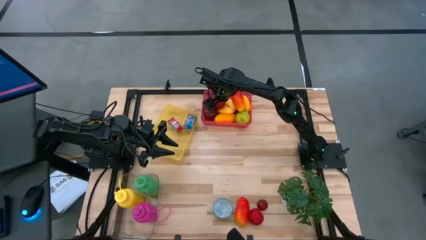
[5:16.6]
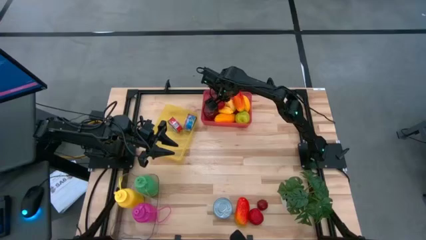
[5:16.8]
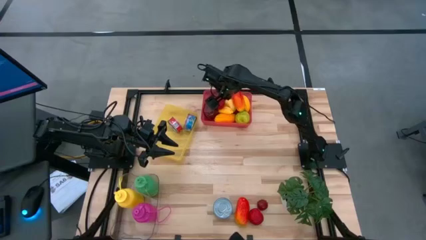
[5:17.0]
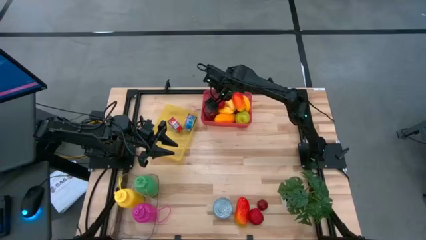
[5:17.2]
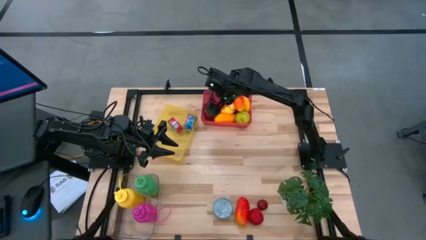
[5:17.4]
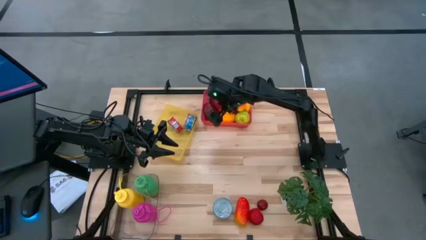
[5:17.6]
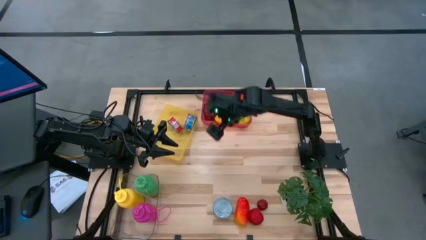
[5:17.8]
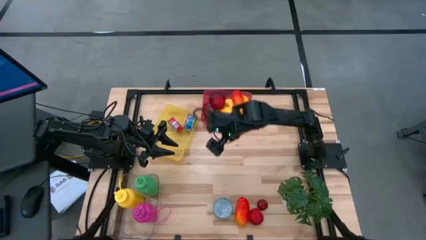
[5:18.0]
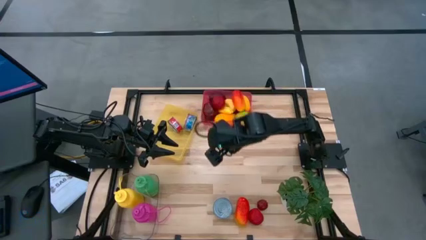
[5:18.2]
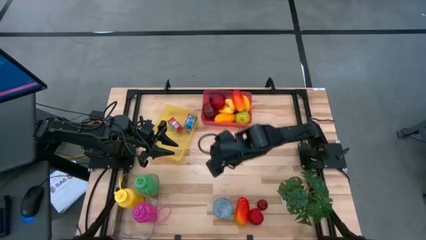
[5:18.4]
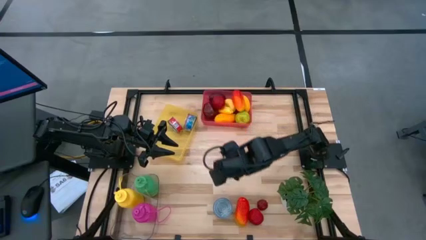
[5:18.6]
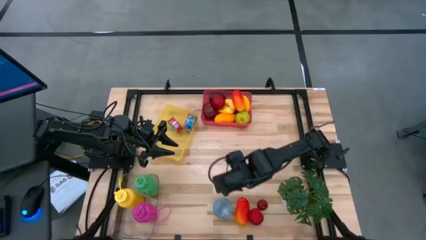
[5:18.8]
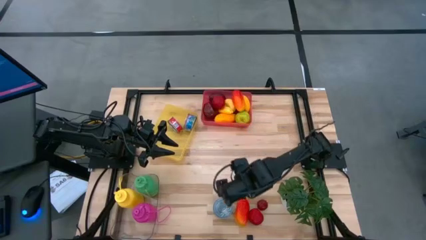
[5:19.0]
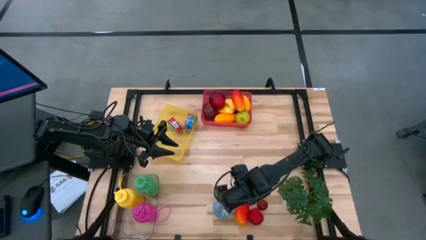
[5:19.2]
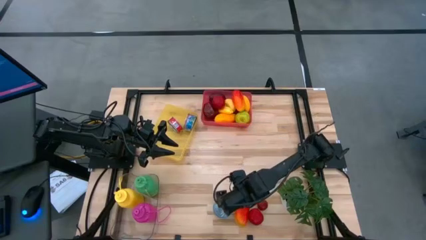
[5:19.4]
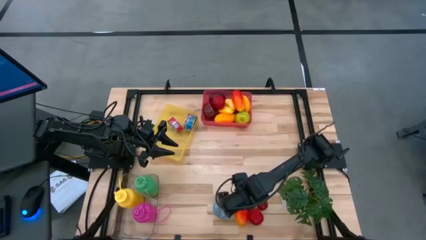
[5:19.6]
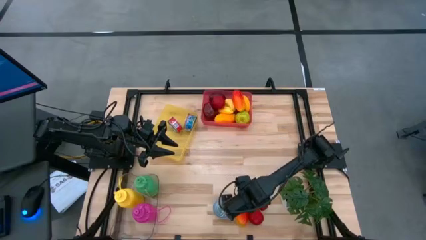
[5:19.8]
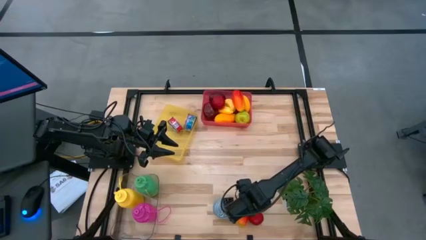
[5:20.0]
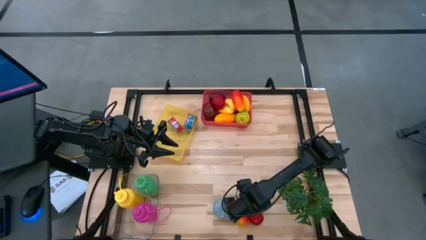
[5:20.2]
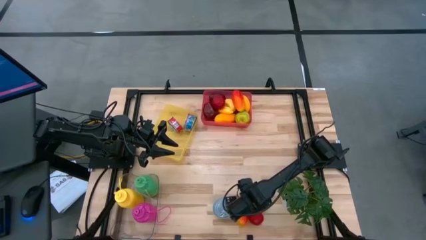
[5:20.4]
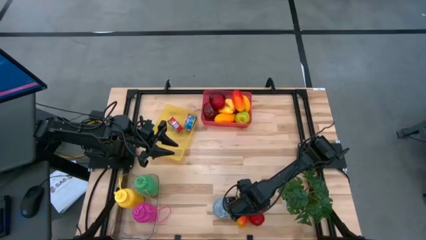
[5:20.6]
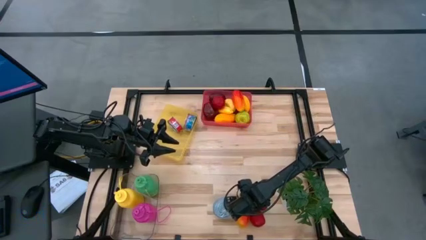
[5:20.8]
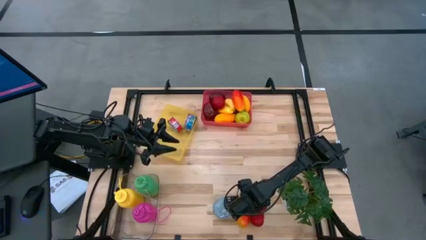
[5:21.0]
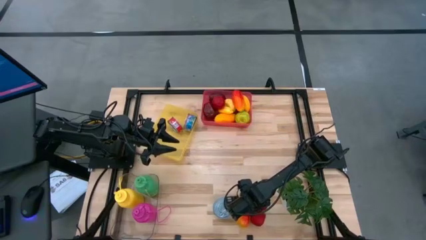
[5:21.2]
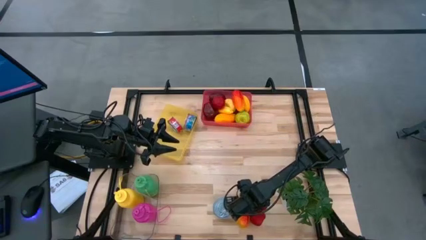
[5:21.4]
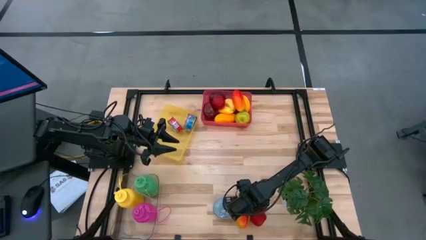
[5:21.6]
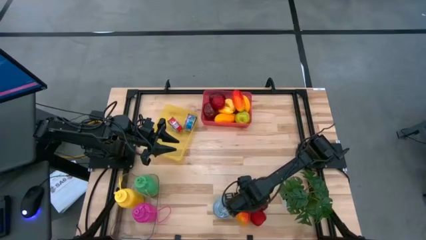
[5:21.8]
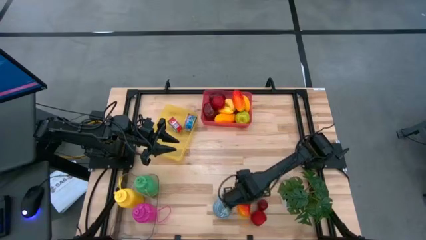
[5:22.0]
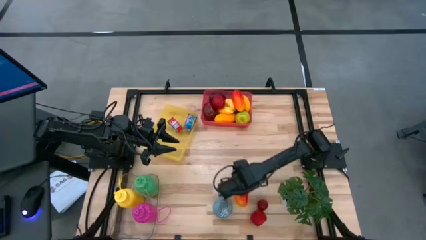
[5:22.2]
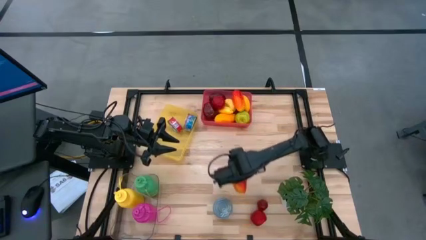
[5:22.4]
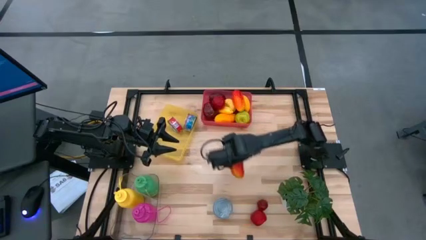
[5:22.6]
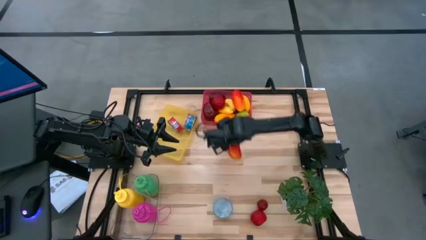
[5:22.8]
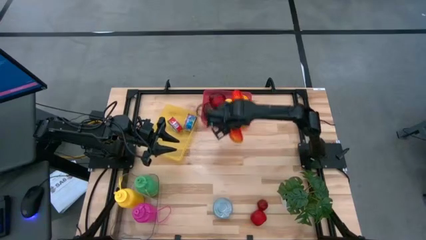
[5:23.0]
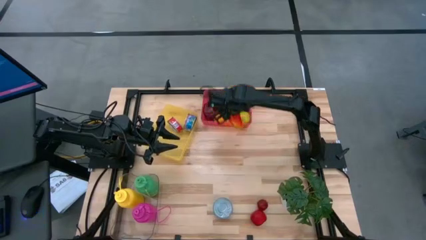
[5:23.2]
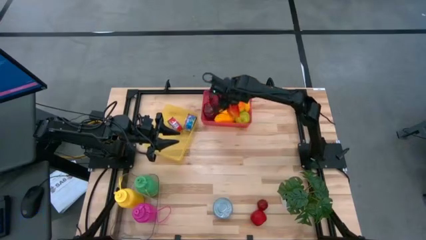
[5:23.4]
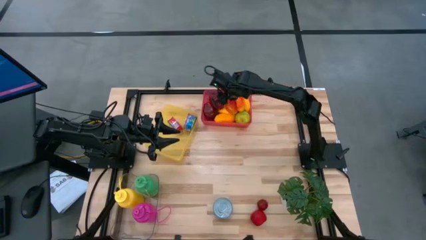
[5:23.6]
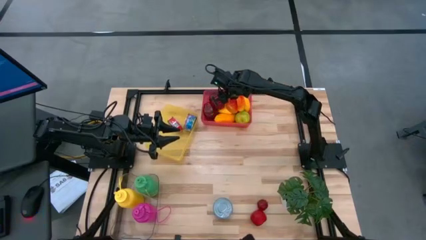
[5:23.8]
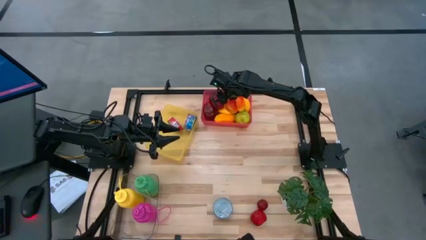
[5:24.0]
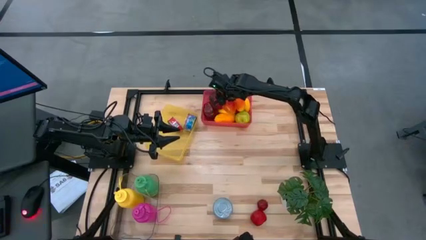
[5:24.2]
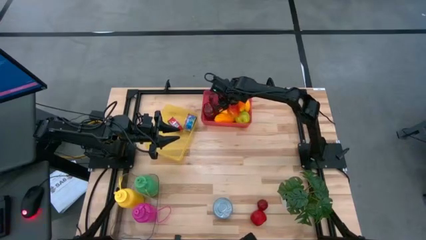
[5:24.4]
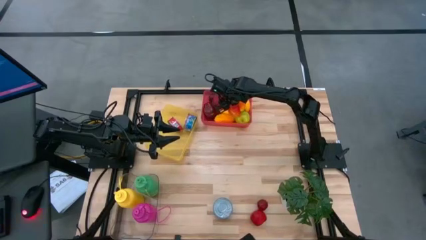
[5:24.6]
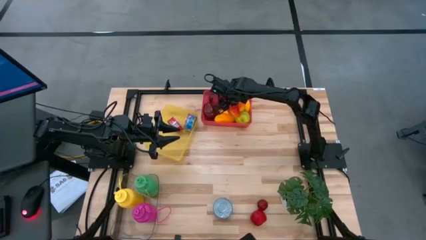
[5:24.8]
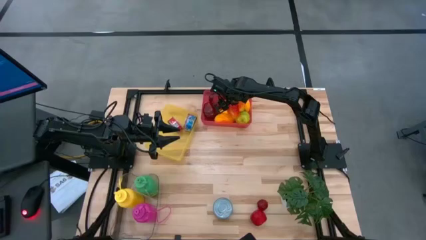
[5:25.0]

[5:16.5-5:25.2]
Task: Pick & Place Food Item
Put the red mango into the pink bin

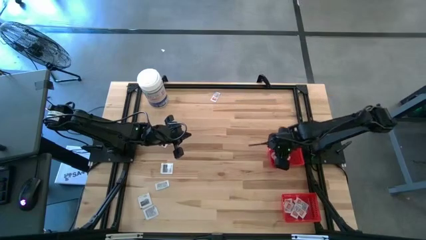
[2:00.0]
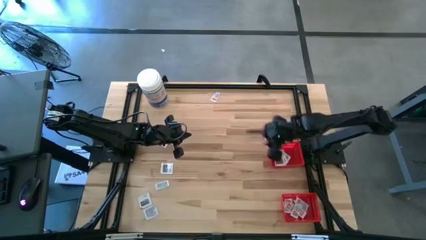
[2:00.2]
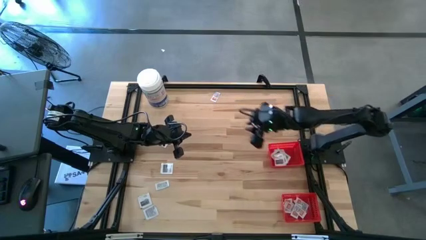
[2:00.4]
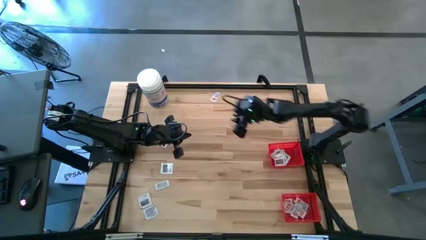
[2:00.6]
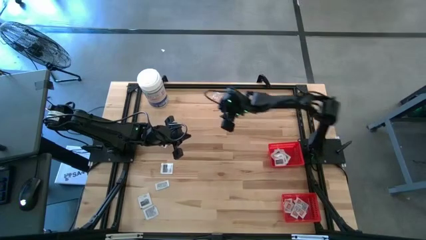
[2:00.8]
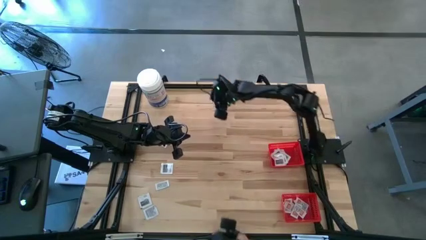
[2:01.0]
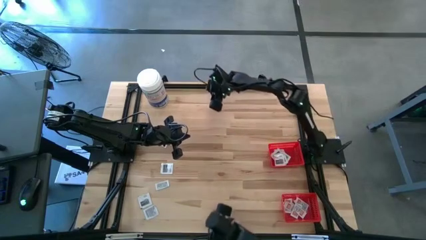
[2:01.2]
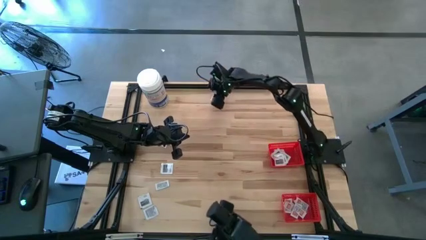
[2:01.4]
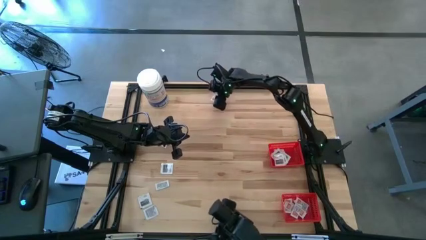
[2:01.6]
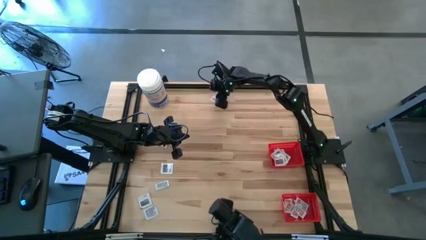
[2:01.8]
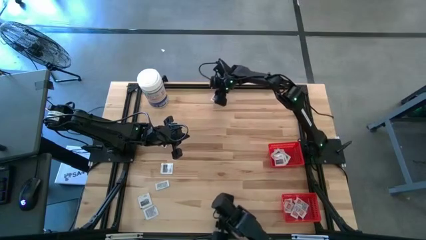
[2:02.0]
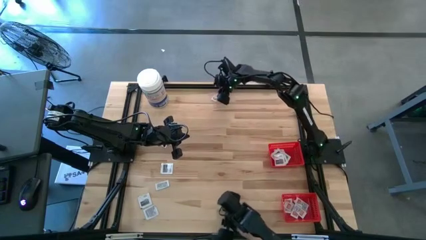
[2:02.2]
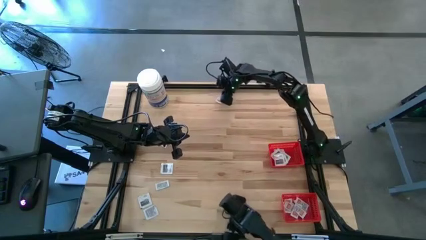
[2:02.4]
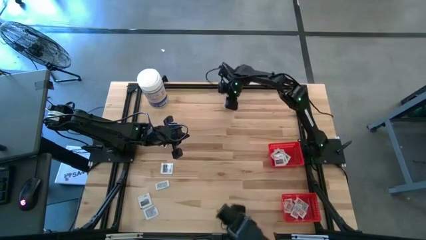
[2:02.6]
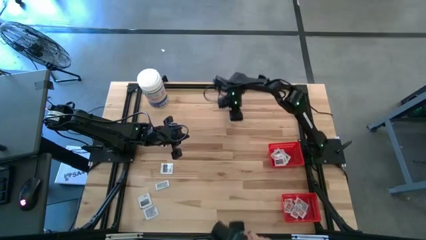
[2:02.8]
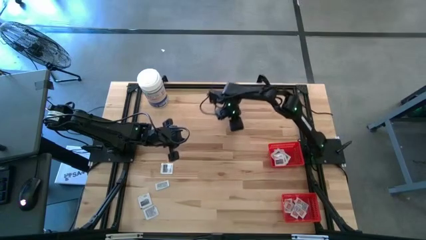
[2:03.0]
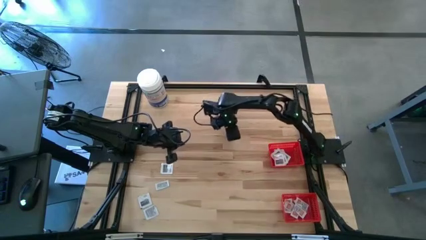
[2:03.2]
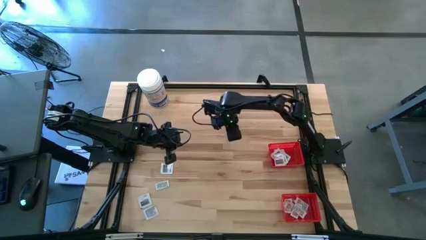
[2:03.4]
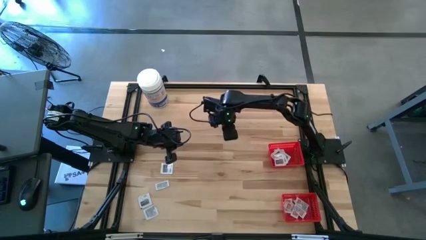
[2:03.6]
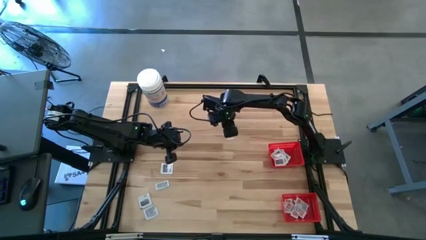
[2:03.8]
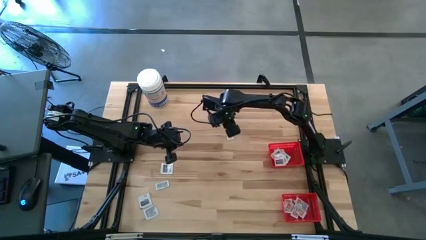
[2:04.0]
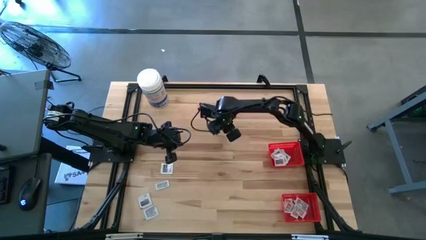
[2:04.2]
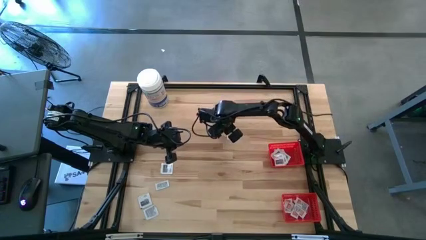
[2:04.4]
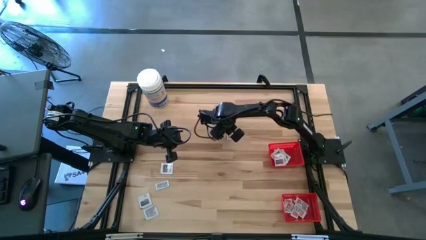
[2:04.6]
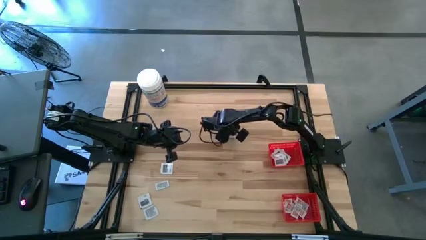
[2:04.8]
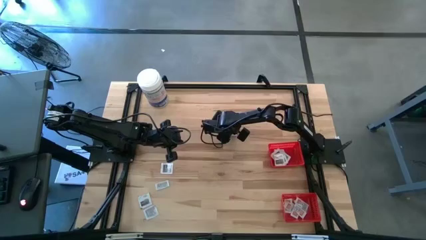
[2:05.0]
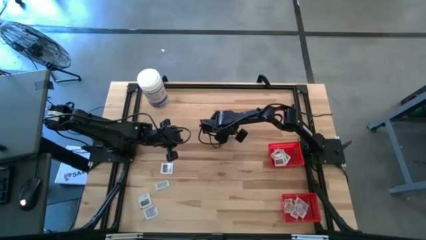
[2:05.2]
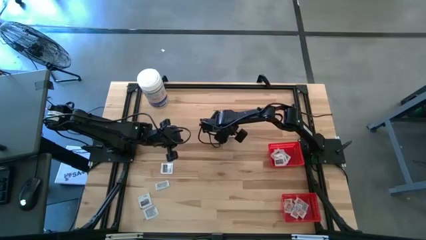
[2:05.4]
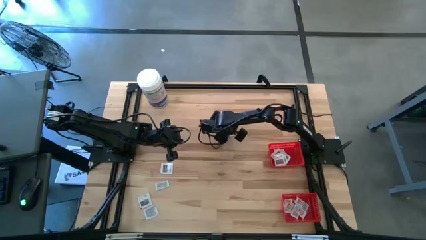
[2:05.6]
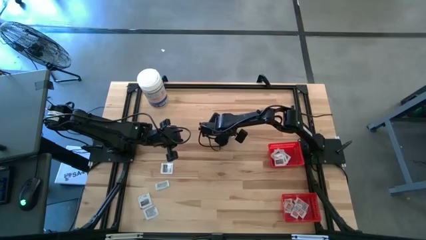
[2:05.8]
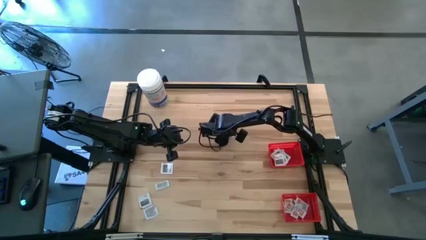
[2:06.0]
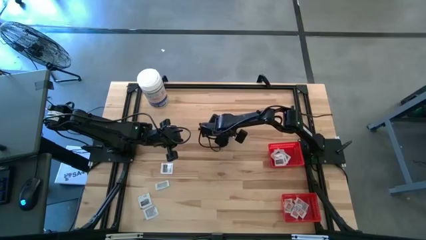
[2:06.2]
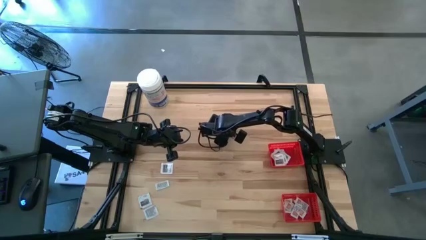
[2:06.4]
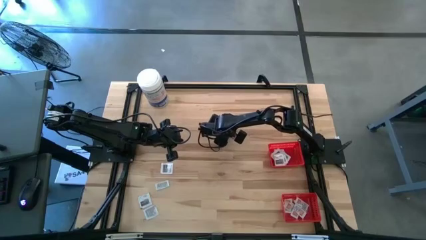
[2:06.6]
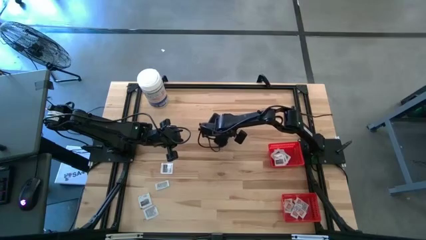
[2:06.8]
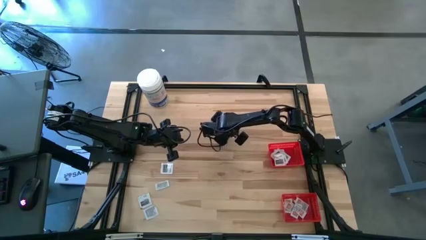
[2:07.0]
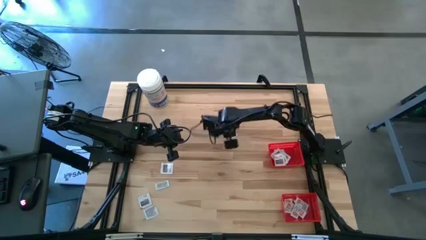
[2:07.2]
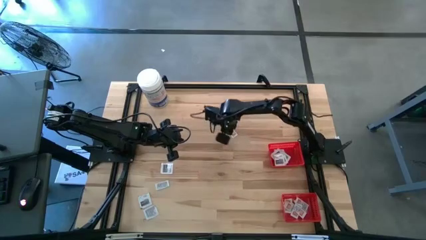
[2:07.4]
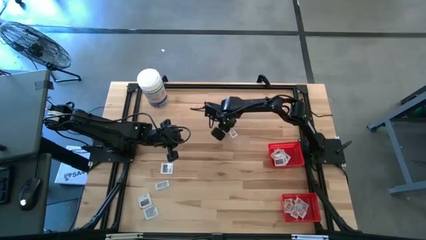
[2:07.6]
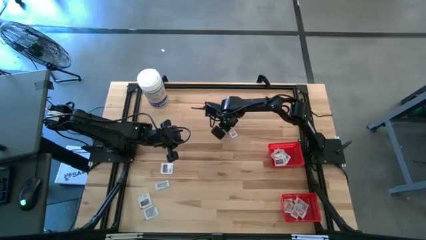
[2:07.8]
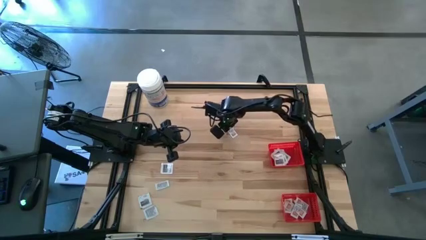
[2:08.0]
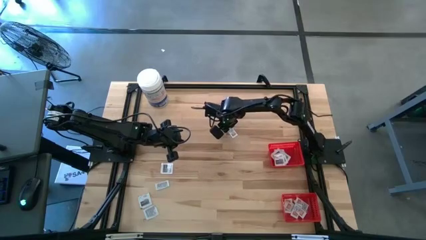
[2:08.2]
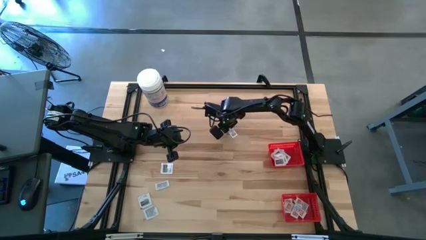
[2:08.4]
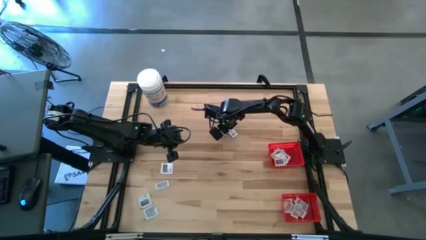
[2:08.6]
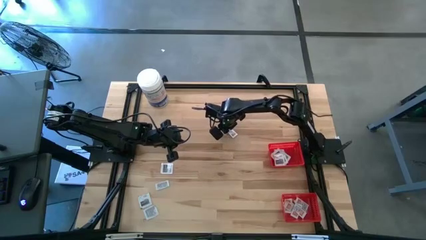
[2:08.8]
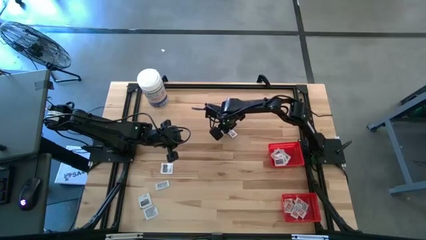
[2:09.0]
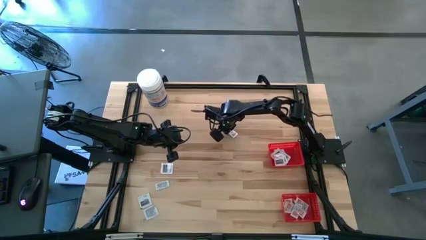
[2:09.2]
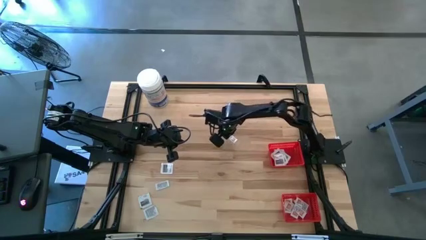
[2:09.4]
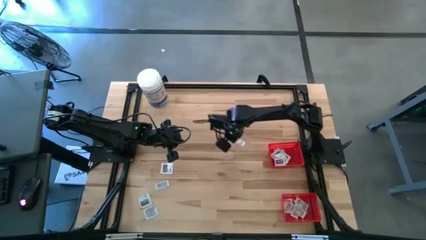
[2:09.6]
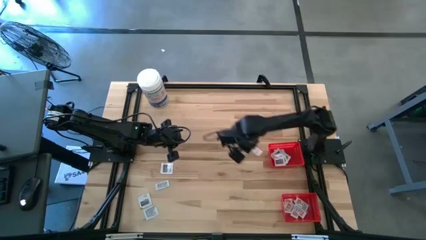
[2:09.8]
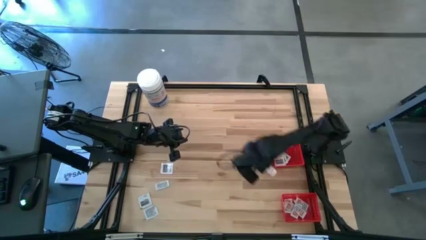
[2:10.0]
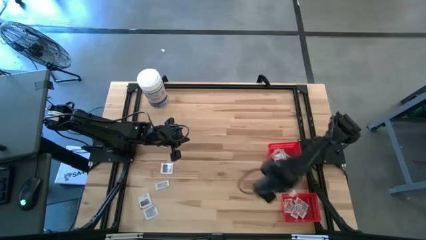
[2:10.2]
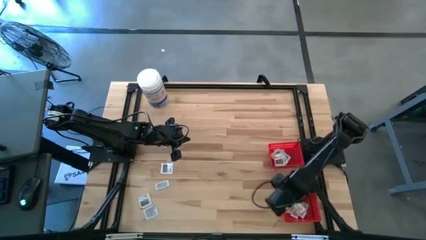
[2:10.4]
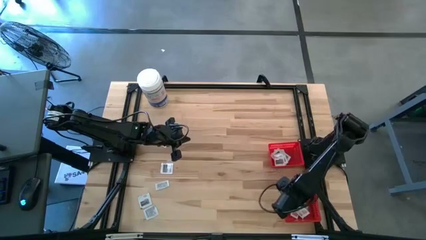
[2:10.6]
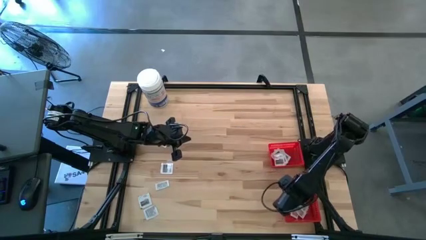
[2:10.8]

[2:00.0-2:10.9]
Task: Pick & Place First Aid Supplies
Put the orange ointment pack into the bottom red basket
